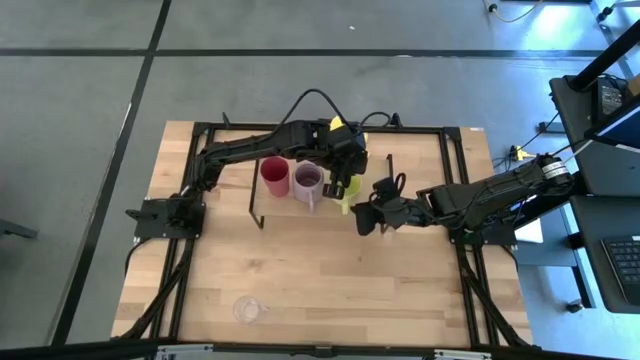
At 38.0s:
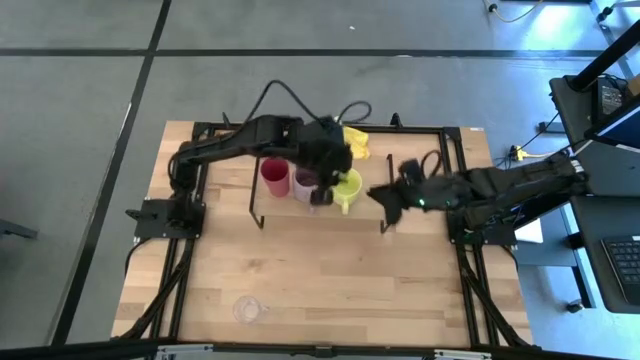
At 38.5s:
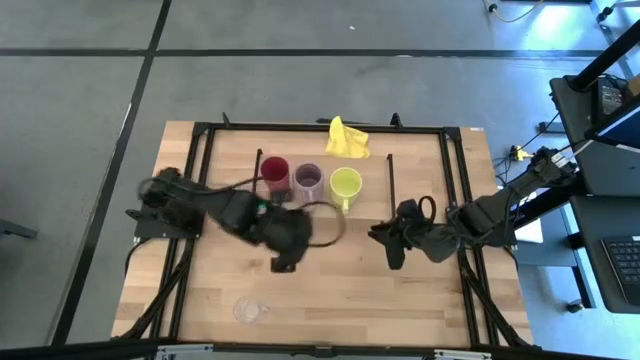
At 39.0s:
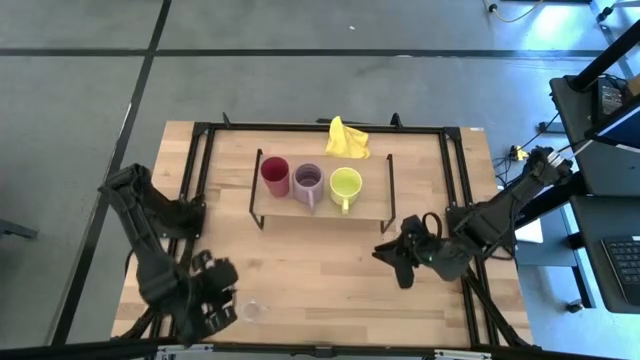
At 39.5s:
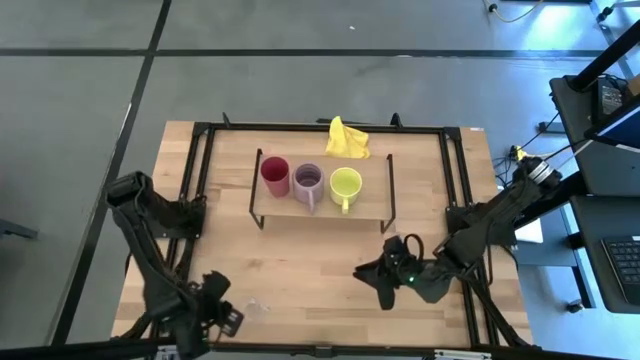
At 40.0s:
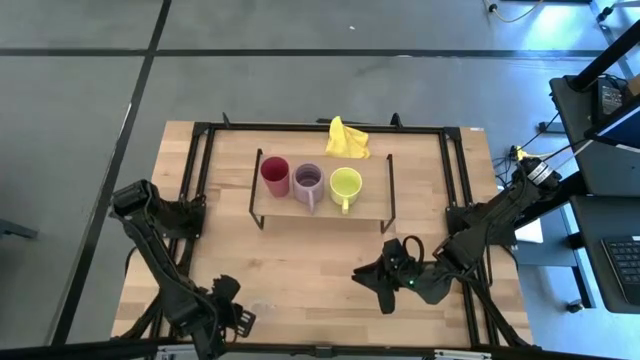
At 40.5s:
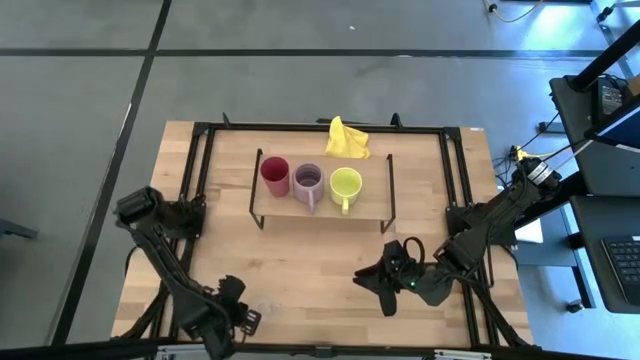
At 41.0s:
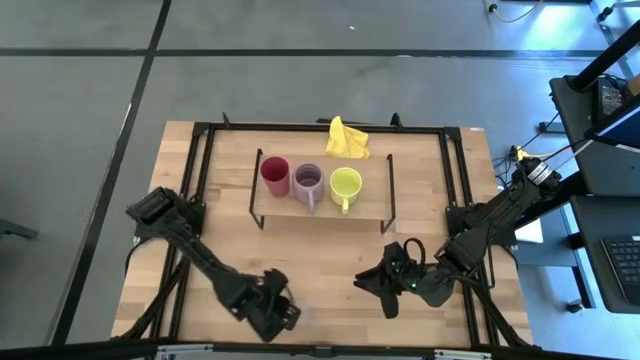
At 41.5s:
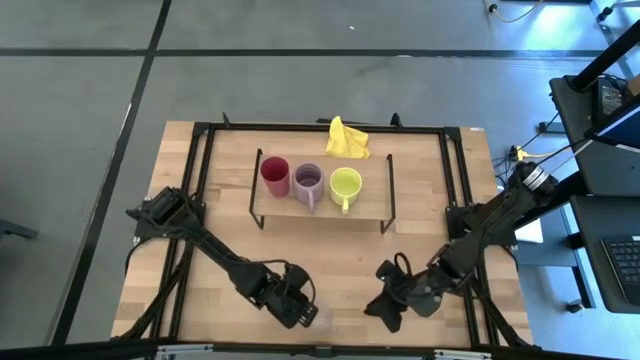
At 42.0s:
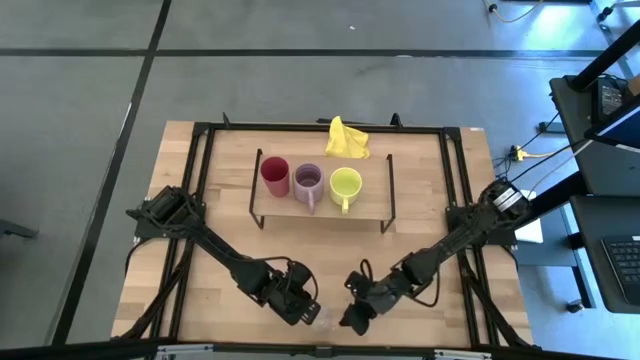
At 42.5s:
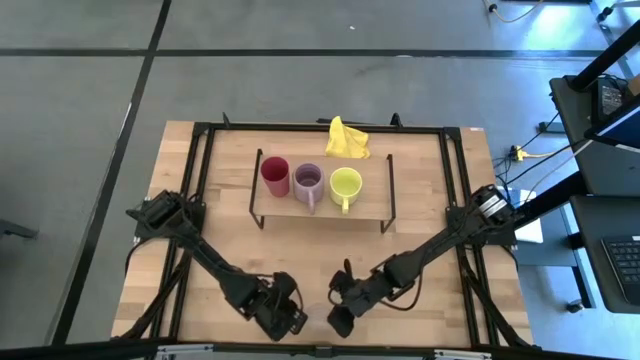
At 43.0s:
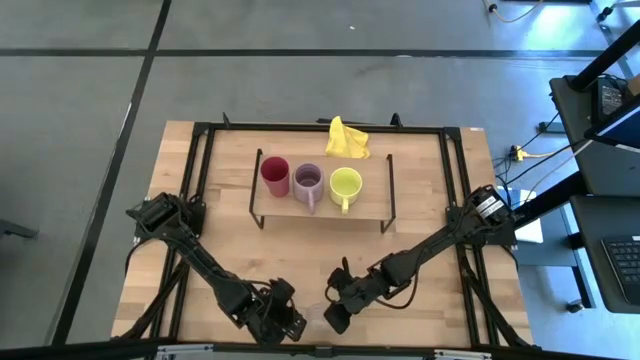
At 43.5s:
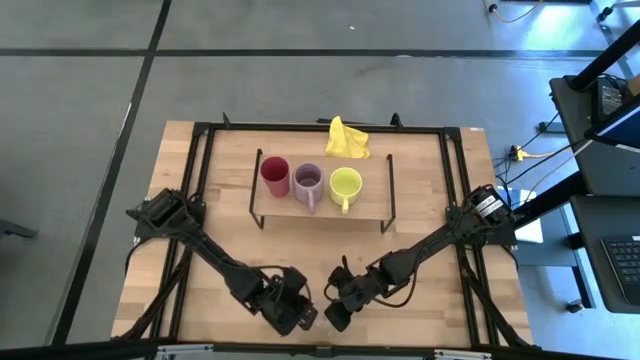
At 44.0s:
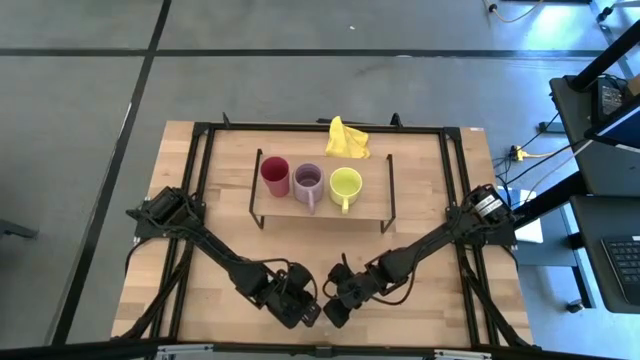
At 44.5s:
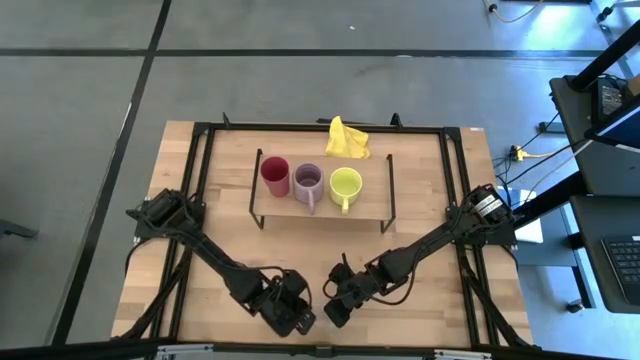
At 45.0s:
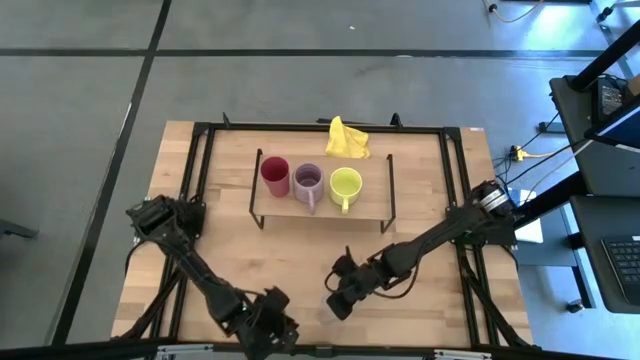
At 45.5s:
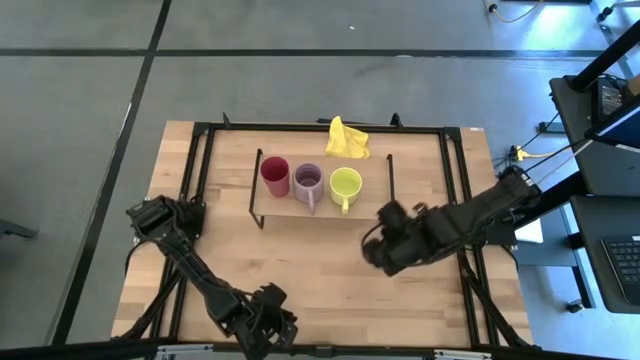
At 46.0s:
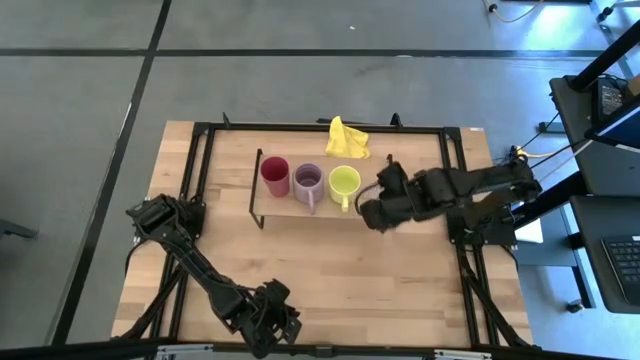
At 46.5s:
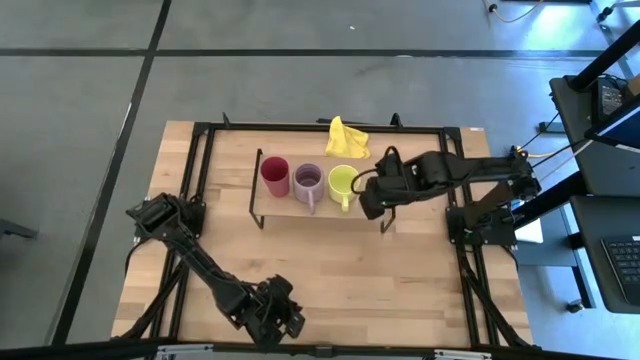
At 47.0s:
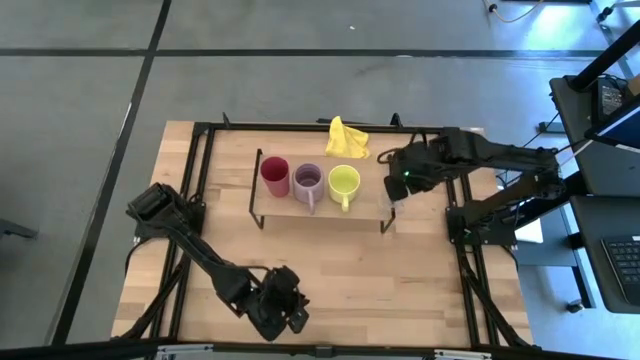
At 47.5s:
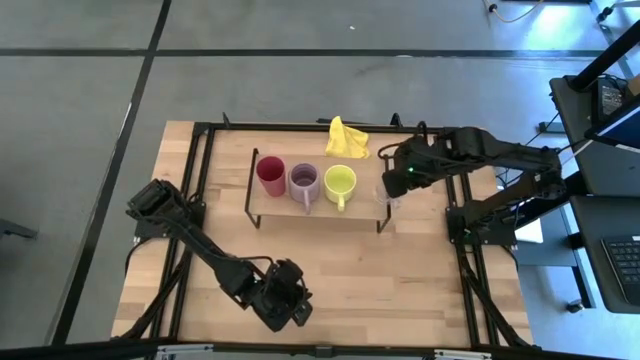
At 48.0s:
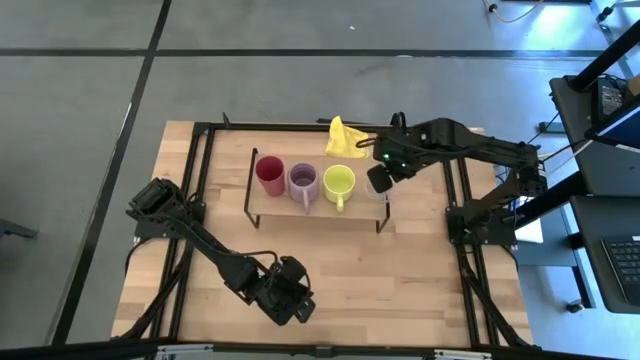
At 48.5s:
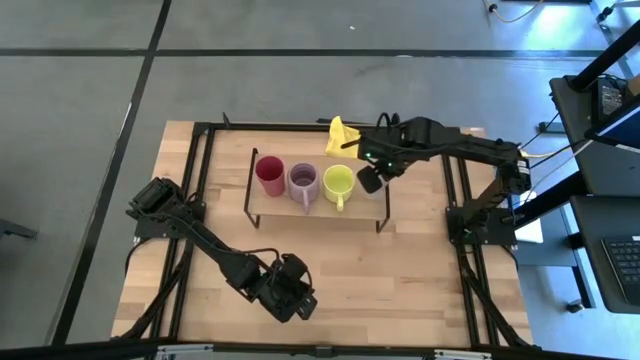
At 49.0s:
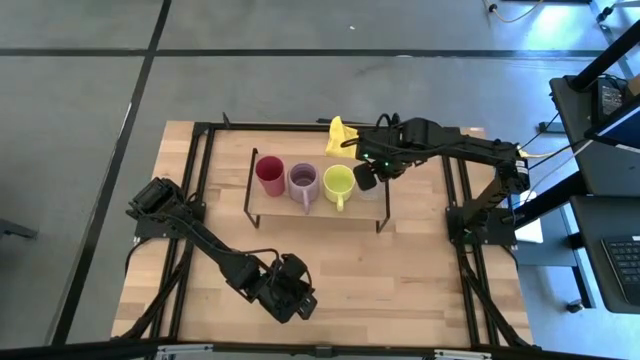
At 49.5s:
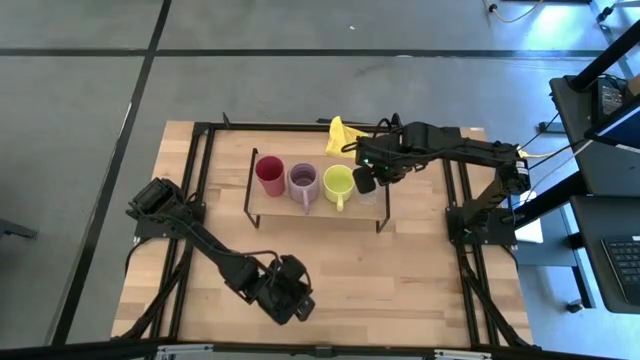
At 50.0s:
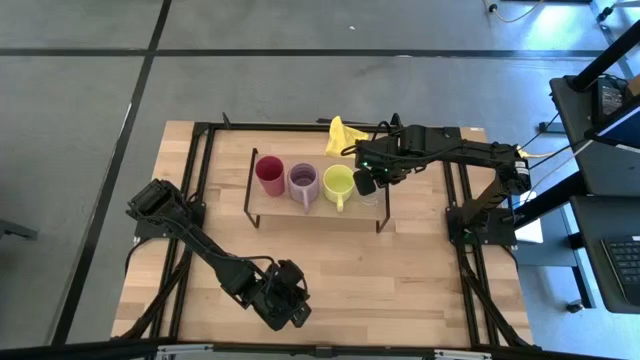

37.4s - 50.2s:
Task: Stack small to large cups/mugs on shelf
Put the transparent mug on the shelf

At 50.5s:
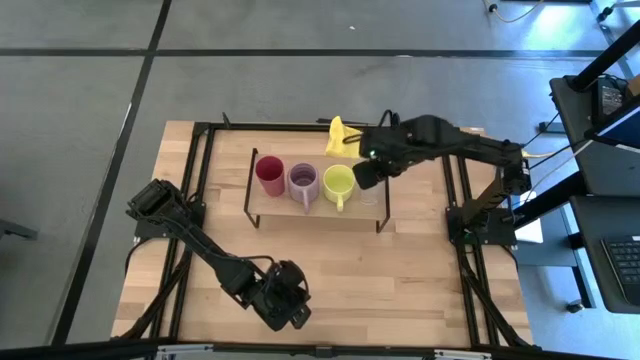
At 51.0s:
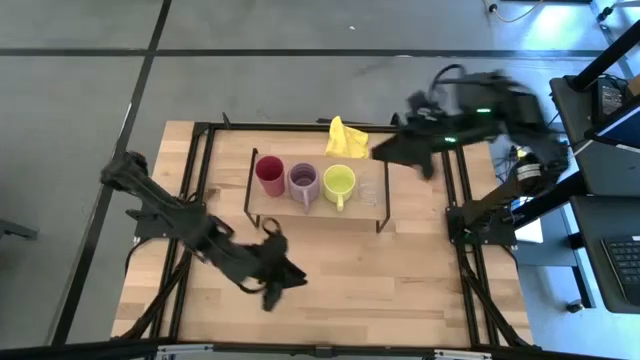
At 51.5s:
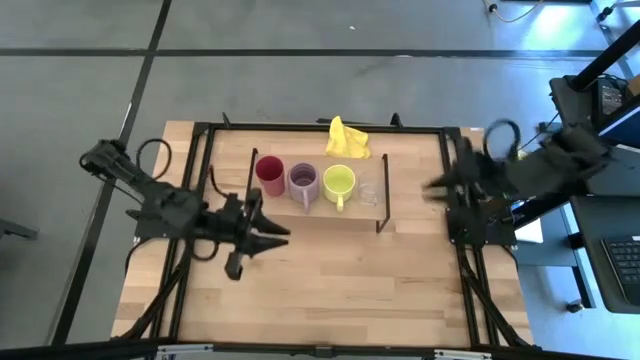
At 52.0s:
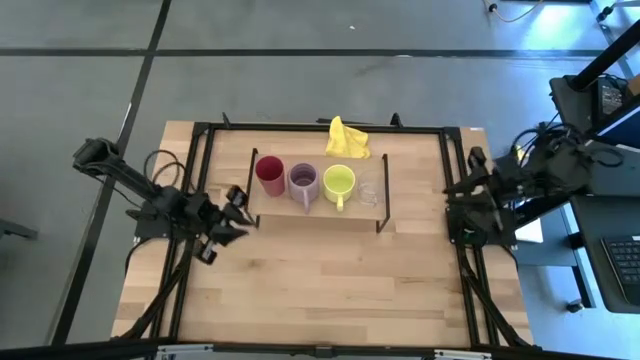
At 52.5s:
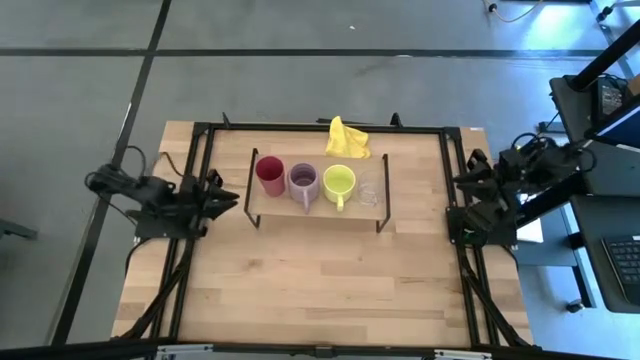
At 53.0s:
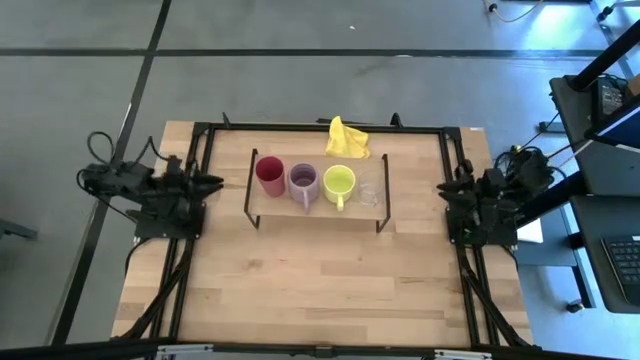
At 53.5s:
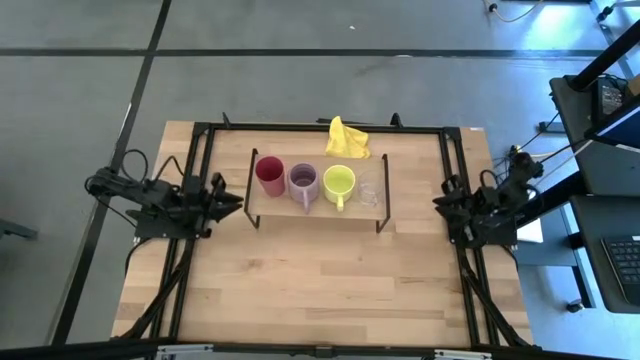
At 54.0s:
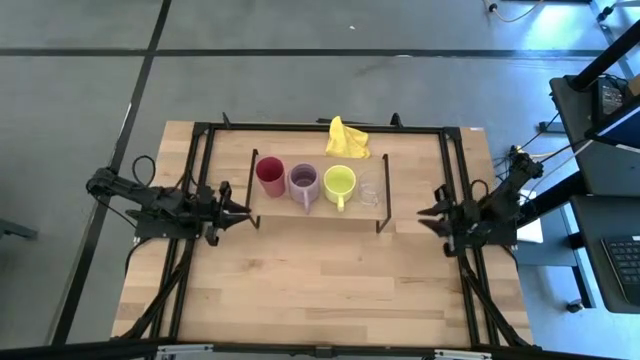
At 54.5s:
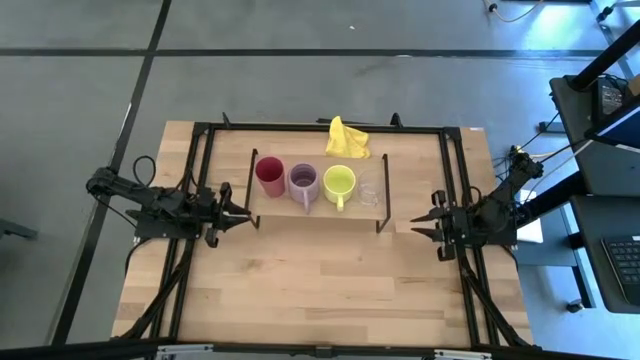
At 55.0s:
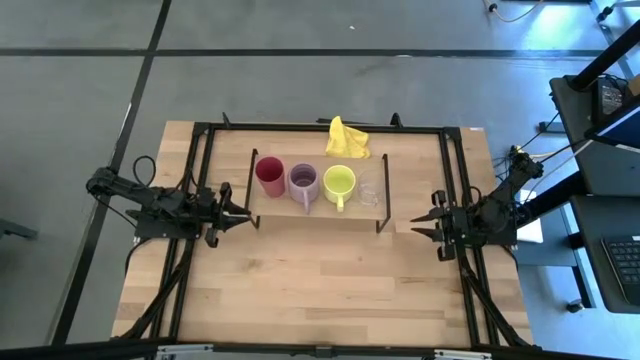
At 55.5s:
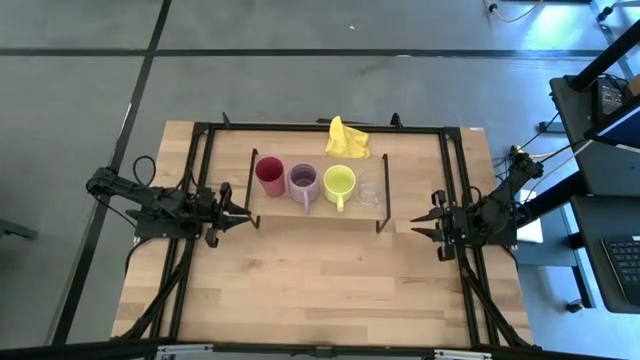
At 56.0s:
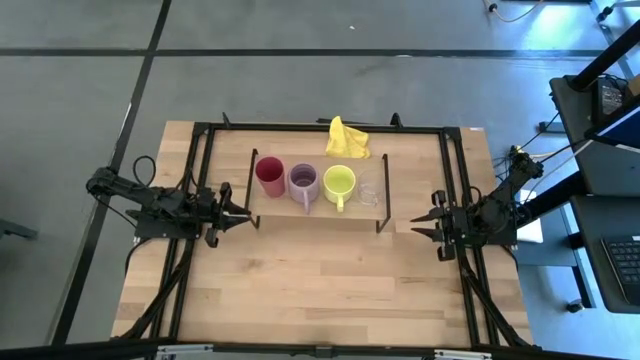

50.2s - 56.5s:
Return to Home Position
